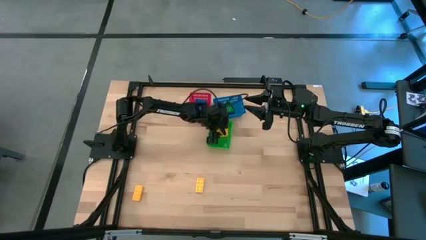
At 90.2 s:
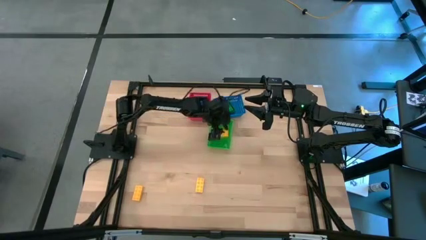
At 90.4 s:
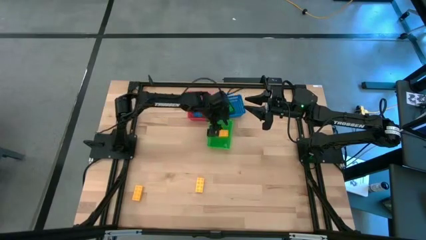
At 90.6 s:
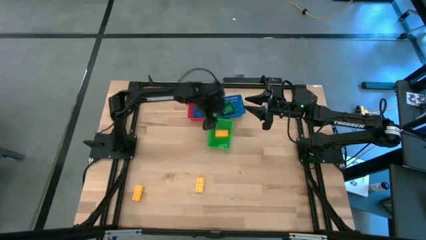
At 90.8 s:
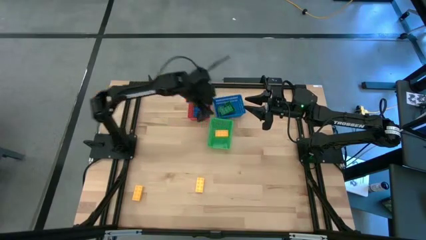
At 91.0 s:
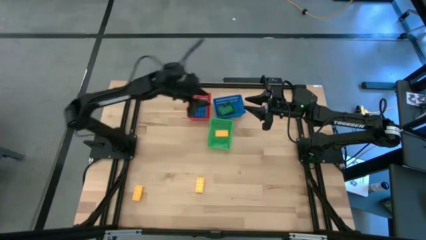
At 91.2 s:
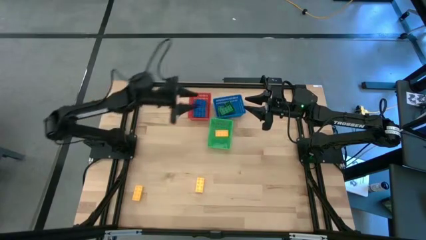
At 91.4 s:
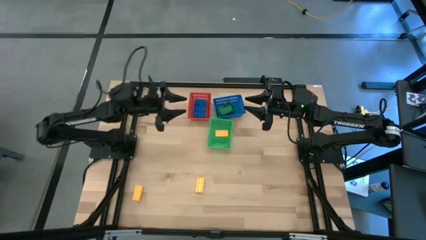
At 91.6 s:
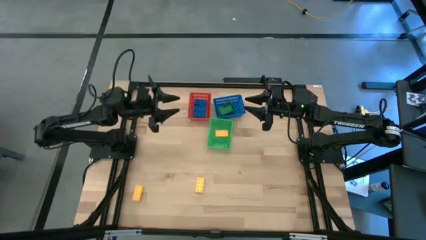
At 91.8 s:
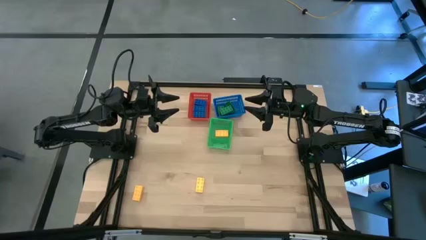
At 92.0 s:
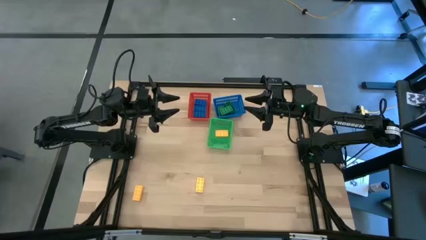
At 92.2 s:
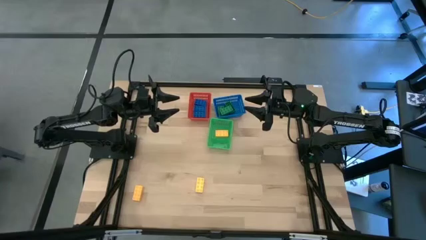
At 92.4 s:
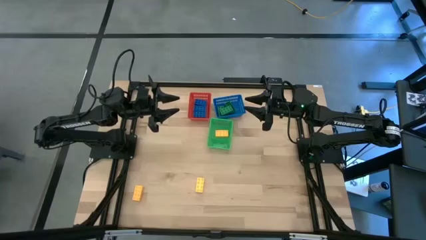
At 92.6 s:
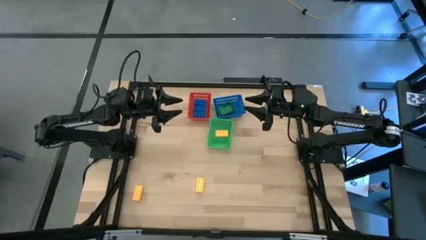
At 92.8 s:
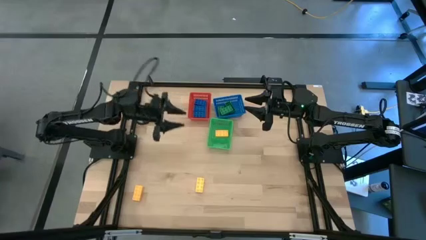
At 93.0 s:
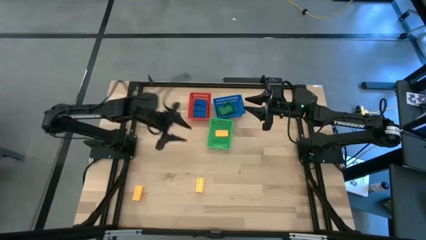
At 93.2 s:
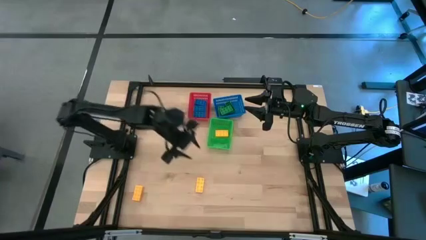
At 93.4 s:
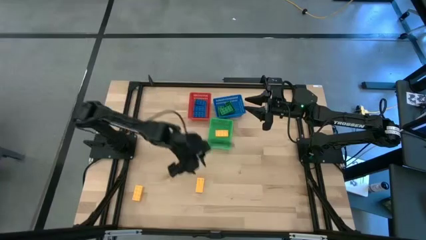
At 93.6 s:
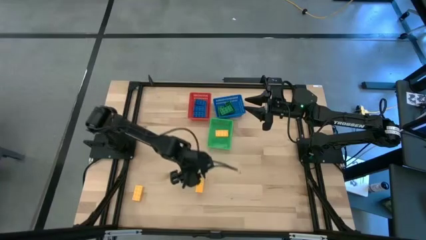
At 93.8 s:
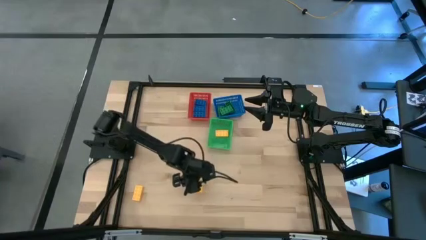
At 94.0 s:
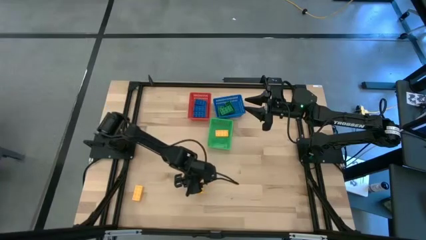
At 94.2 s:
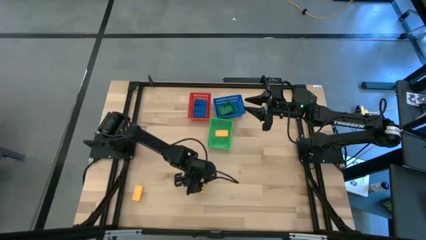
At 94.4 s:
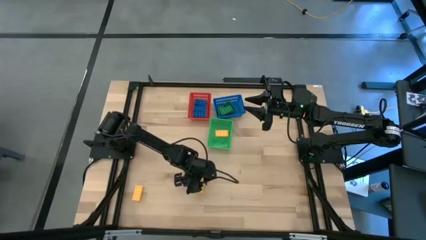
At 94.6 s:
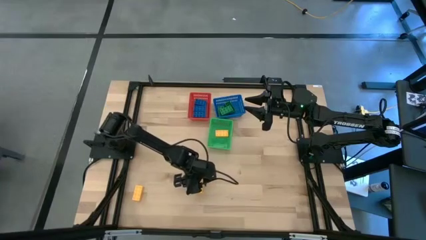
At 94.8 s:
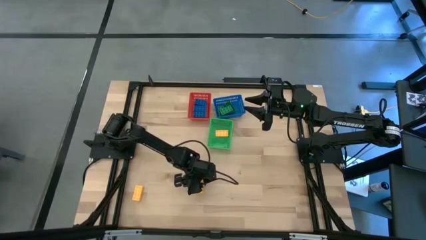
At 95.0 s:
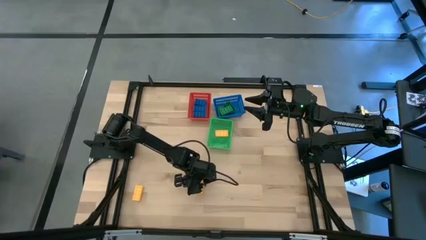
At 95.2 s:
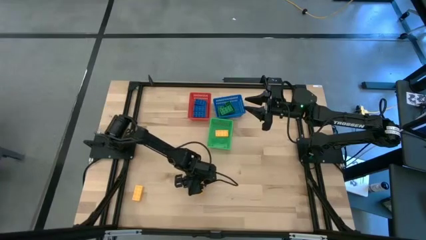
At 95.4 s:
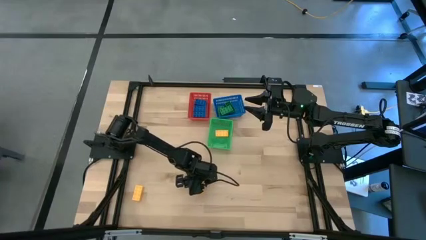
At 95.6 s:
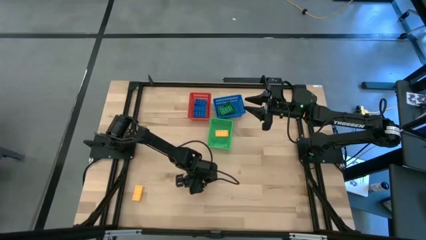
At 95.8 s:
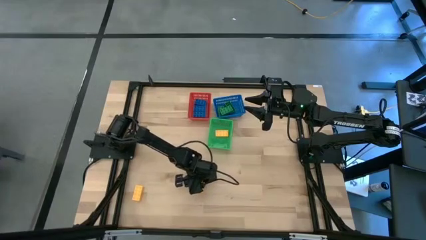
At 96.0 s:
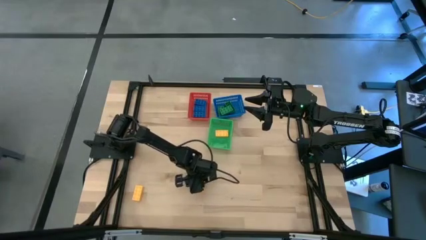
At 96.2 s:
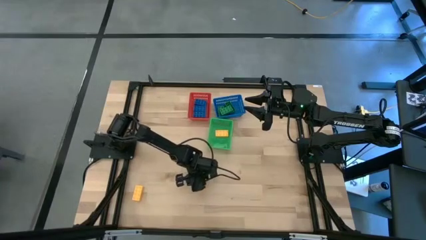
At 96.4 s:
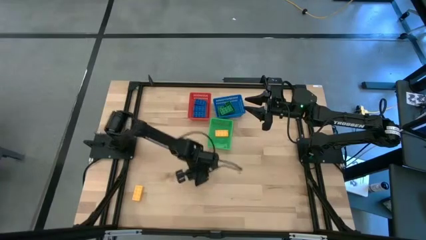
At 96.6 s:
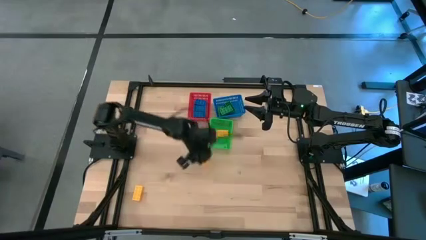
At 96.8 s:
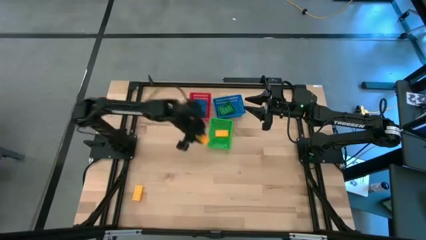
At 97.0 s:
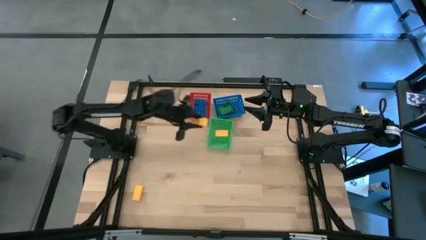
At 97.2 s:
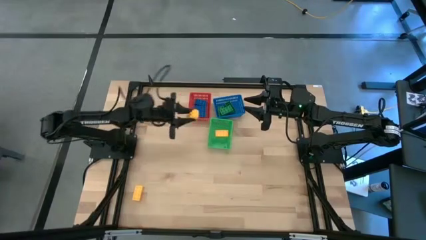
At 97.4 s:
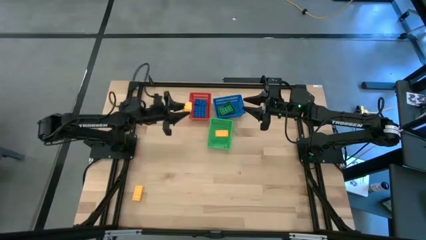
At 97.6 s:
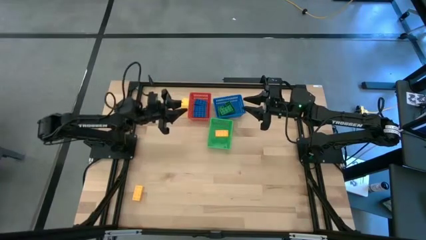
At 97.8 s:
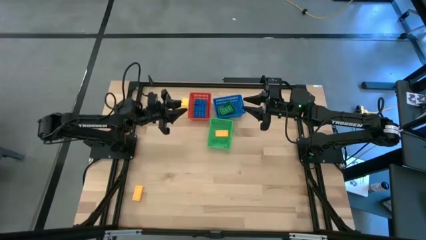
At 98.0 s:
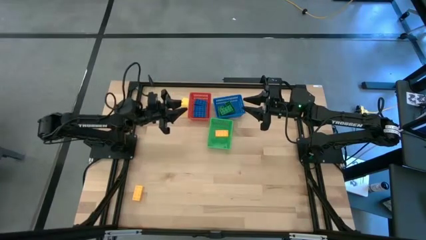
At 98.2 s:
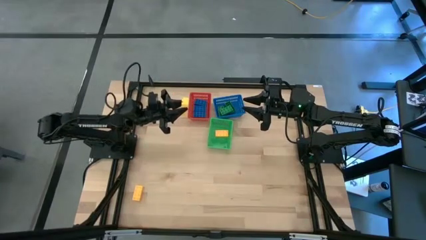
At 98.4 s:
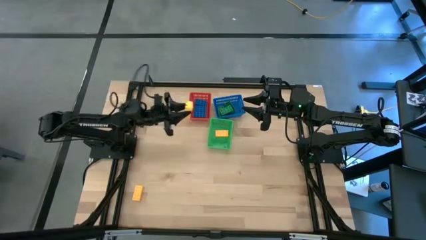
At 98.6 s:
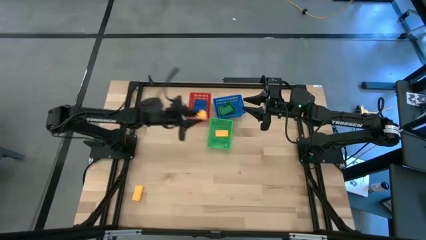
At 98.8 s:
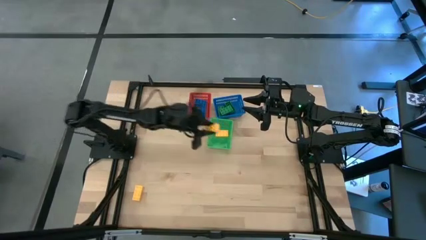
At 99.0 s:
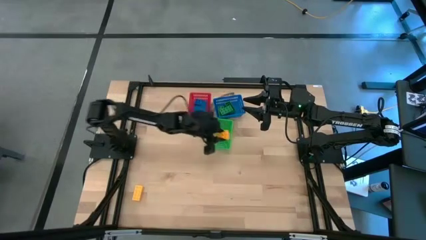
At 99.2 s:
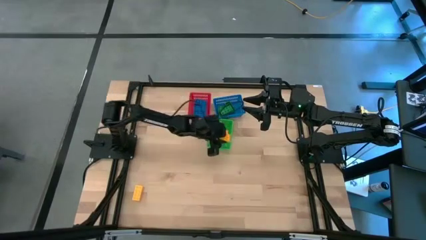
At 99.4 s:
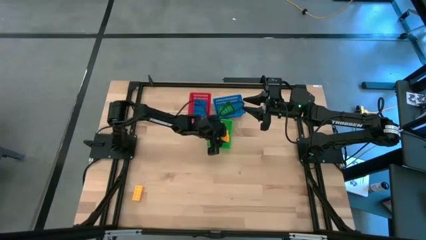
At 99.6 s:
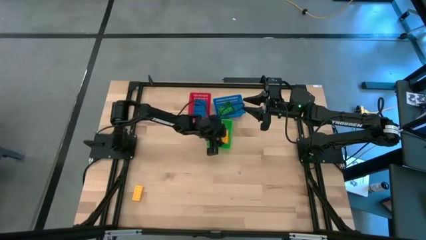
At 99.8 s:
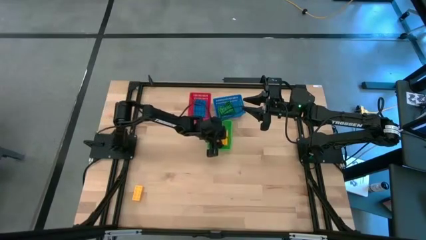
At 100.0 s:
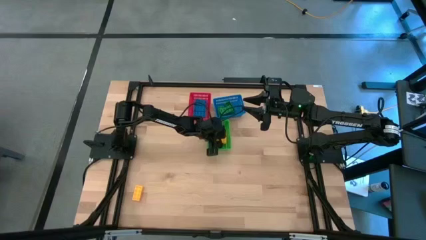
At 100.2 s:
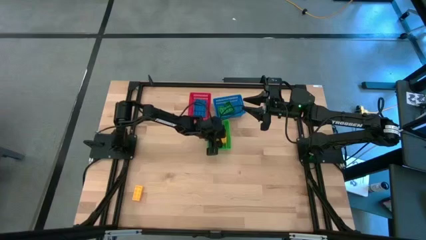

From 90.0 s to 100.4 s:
Task: Sort & place blocks by color
Put the right yellow game piece into the green bin

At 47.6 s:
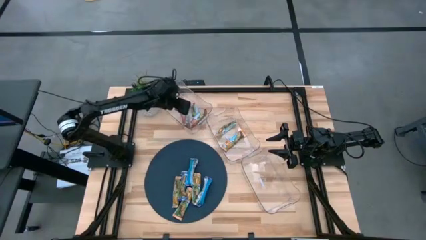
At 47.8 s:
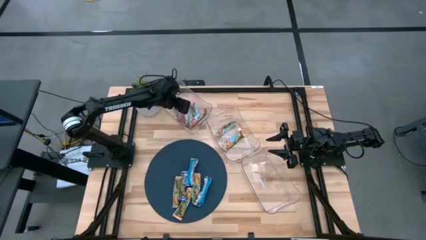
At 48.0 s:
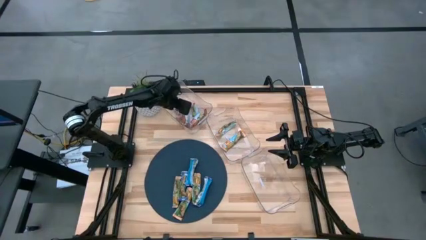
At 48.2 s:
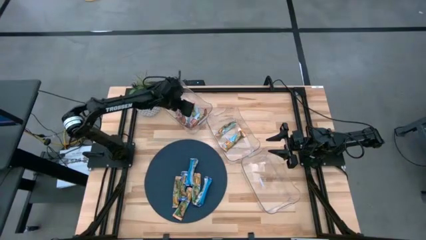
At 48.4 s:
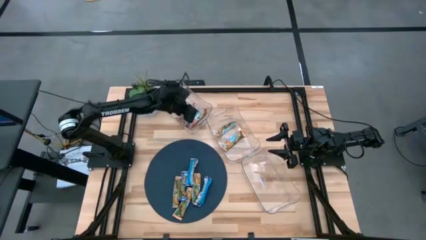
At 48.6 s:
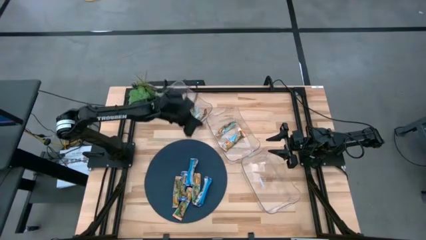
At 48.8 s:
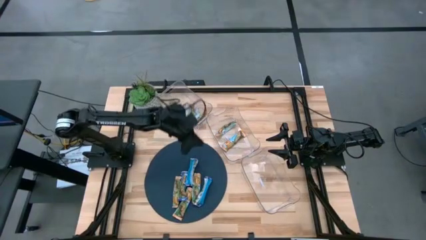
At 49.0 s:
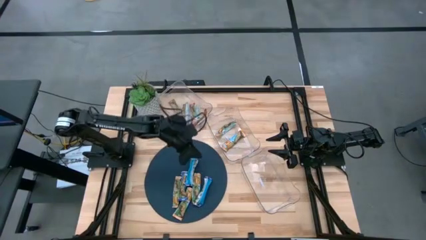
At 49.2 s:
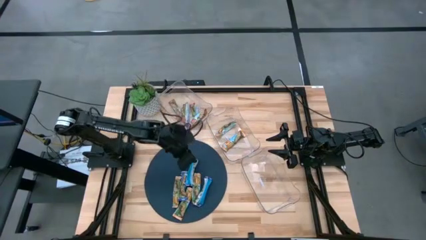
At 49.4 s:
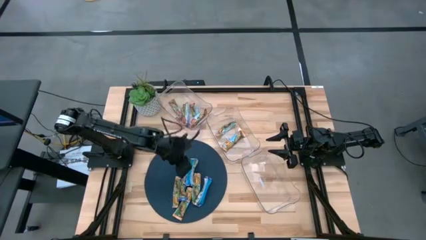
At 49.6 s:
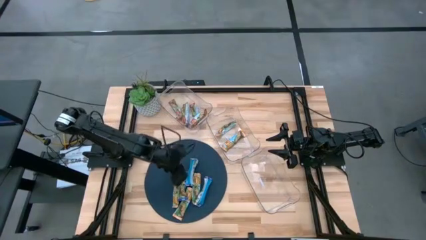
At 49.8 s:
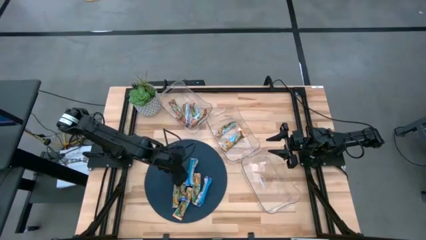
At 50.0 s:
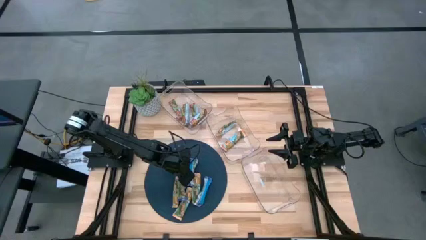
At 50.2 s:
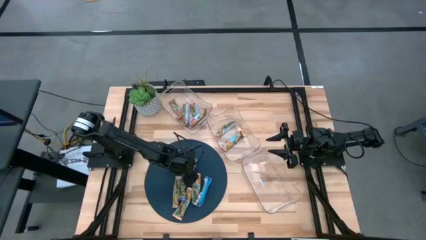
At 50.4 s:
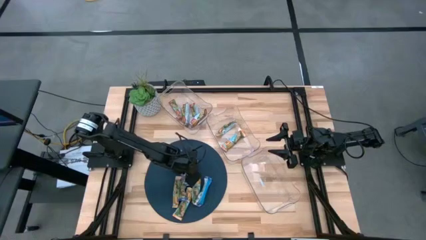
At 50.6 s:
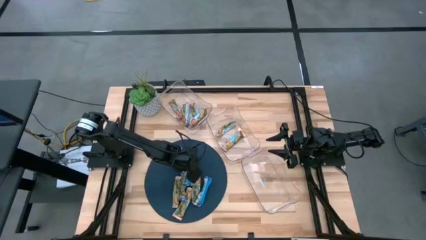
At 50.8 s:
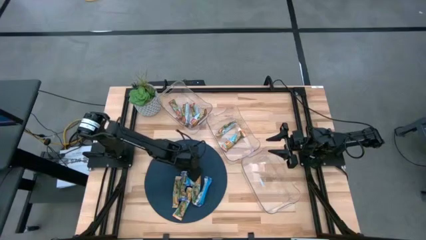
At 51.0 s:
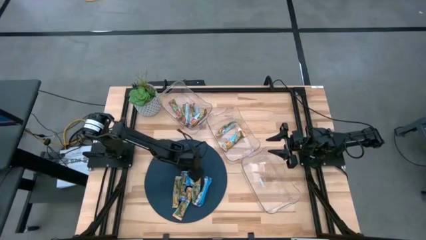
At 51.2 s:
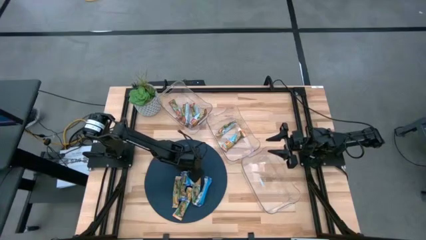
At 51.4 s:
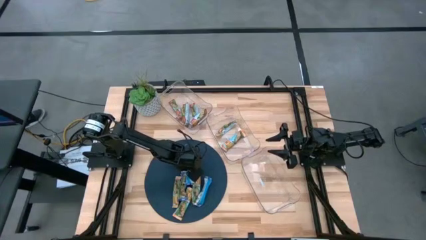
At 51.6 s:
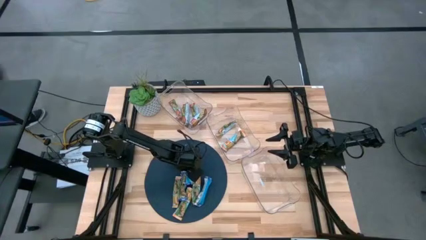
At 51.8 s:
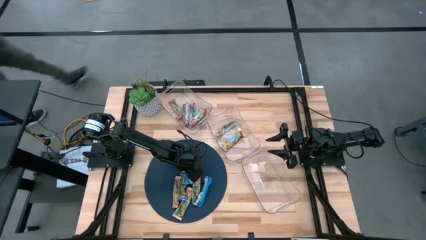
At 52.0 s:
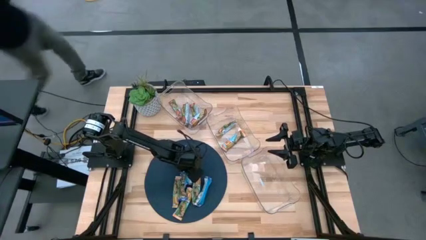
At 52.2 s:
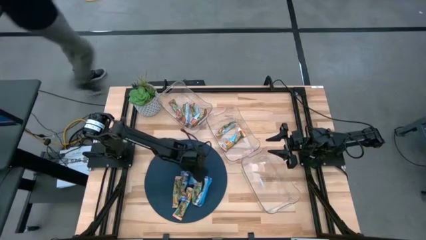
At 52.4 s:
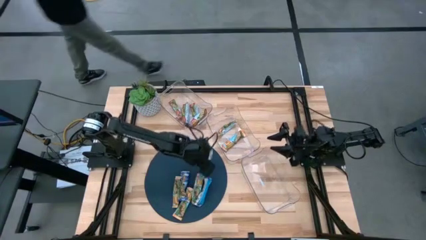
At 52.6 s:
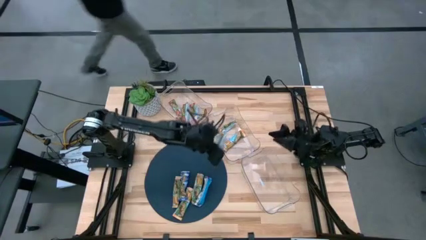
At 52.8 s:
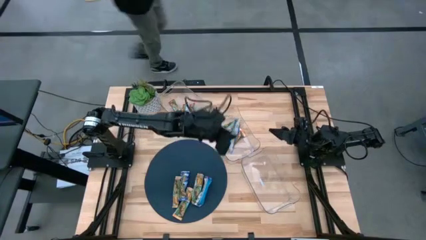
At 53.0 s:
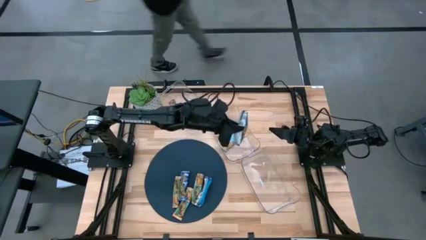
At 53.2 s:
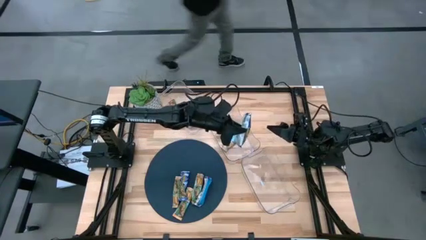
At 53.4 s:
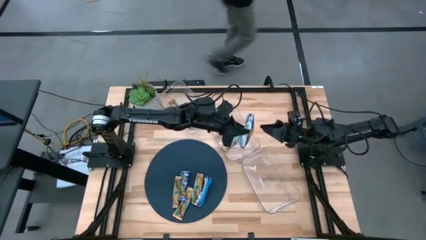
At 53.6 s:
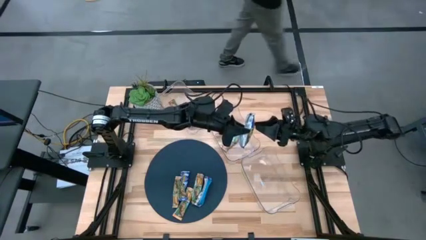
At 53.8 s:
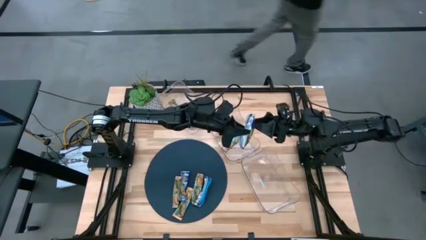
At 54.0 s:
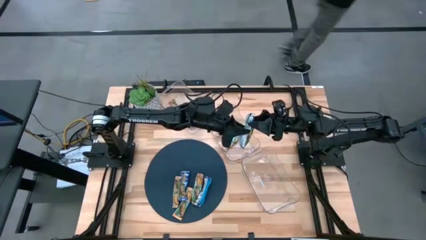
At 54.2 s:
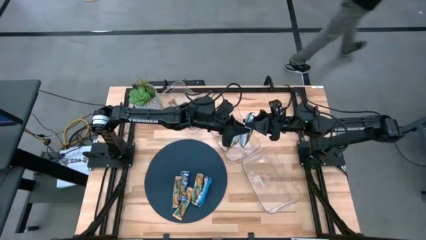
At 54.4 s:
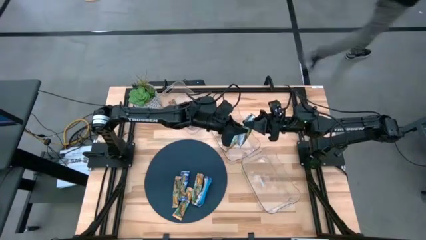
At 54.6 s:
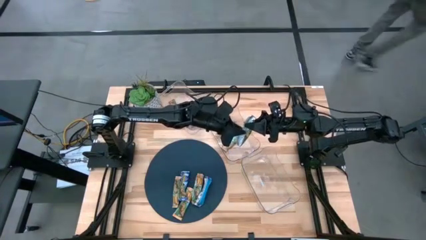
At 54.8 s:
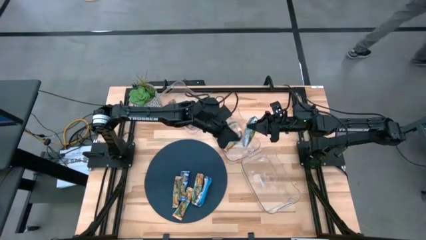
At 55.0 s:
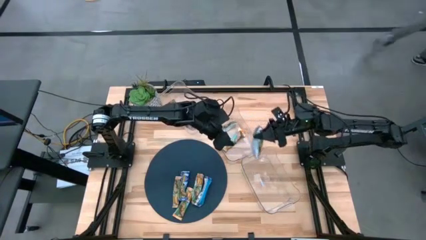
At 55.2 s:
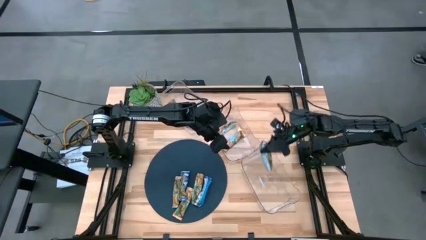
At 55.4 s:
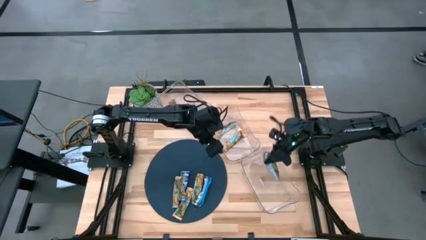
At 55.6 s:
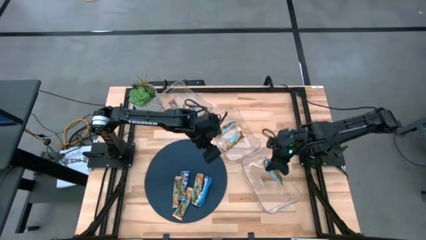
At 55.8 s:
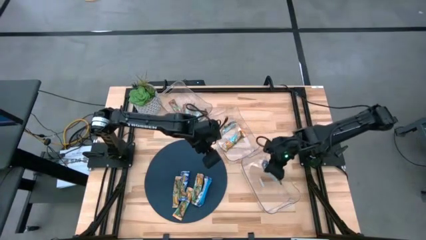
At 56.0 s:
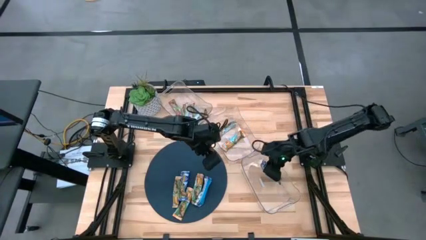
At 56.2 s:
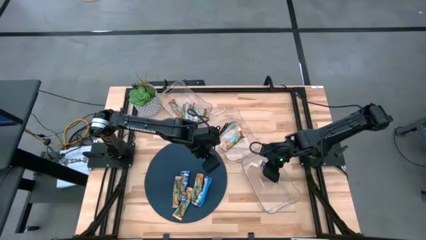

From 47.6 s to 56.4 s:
Task: Pick and place Granola Bars by type
Put the blue granola bar into the bottom transparent bin
